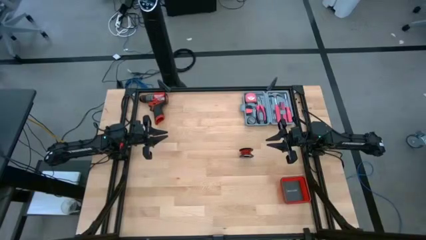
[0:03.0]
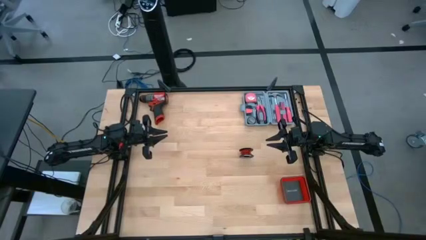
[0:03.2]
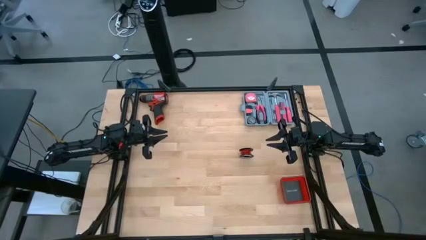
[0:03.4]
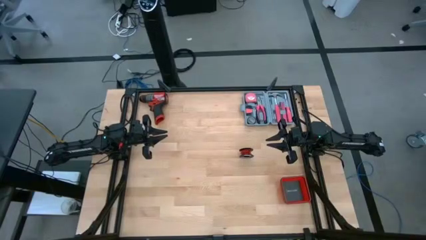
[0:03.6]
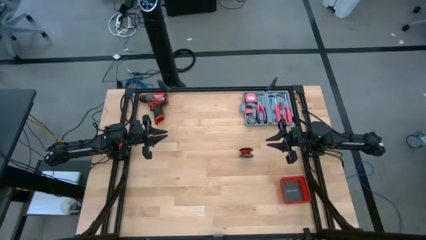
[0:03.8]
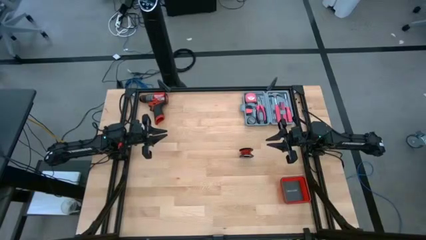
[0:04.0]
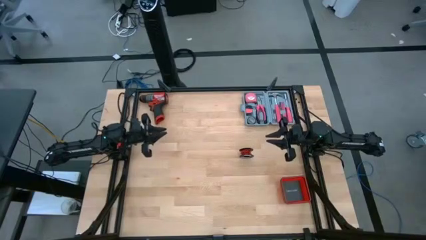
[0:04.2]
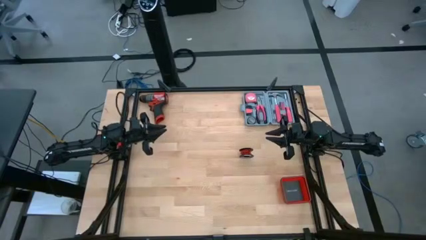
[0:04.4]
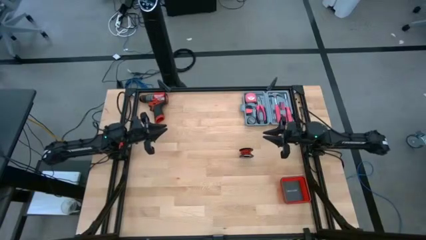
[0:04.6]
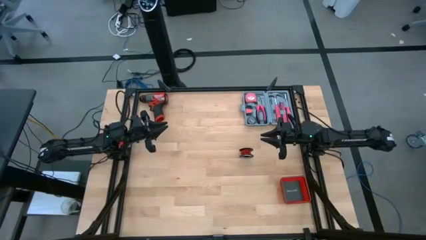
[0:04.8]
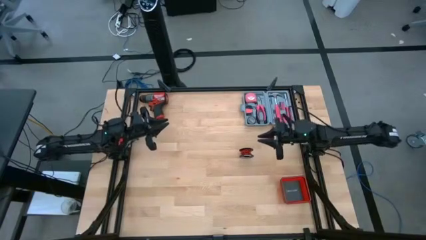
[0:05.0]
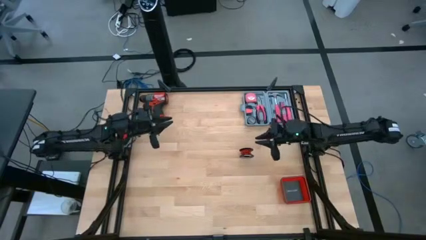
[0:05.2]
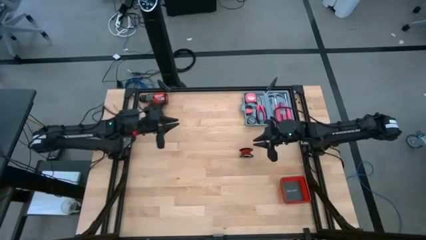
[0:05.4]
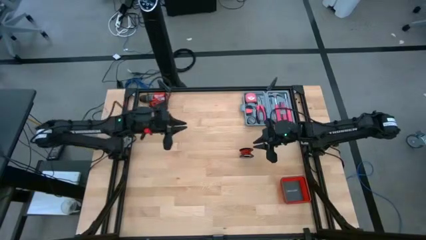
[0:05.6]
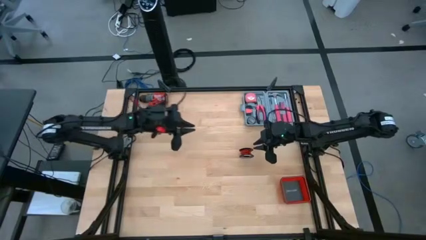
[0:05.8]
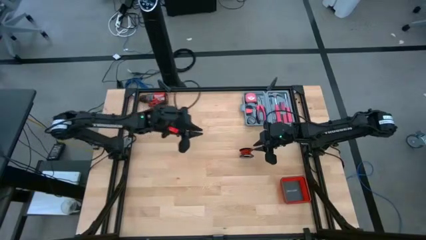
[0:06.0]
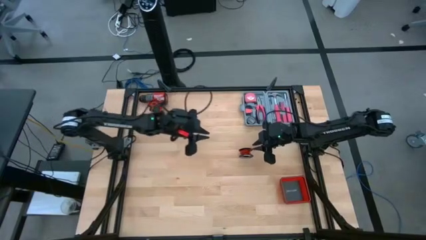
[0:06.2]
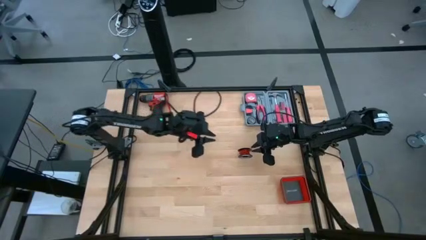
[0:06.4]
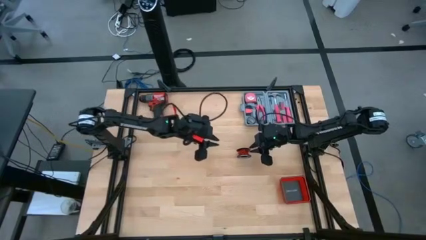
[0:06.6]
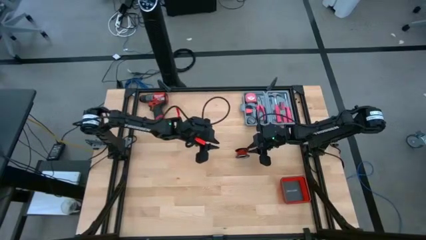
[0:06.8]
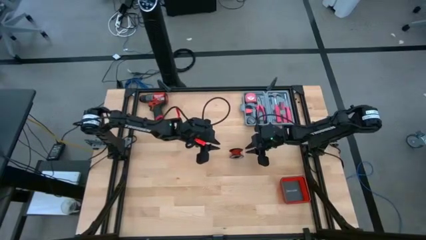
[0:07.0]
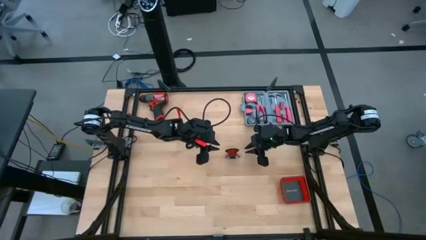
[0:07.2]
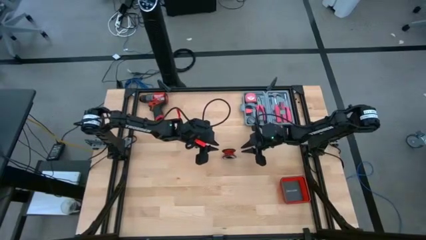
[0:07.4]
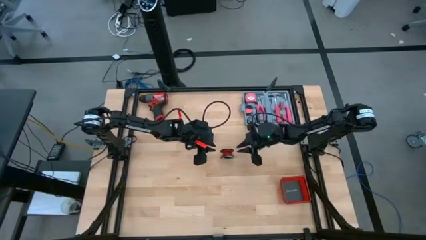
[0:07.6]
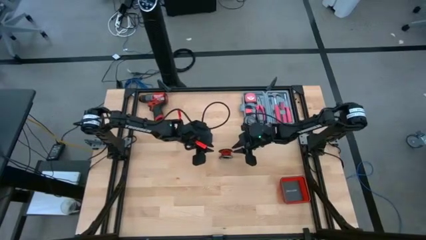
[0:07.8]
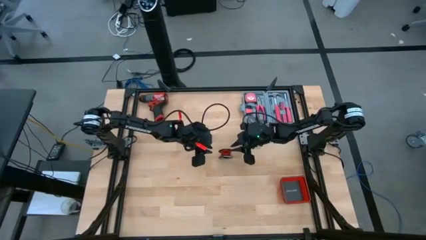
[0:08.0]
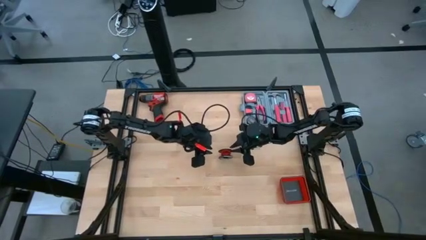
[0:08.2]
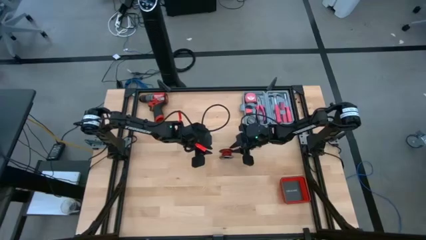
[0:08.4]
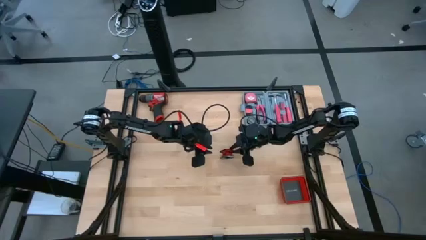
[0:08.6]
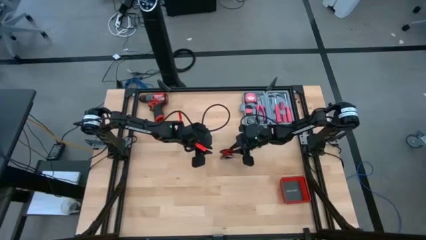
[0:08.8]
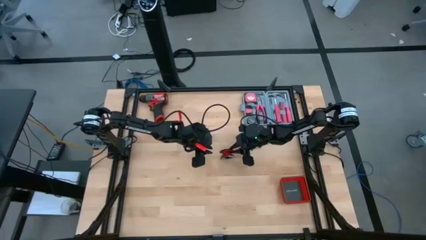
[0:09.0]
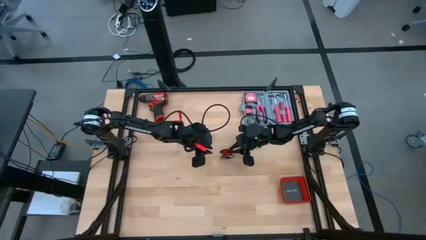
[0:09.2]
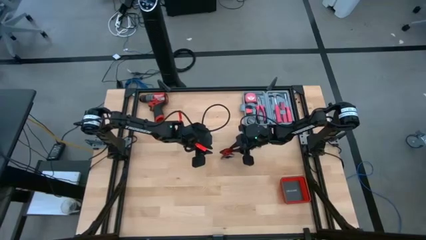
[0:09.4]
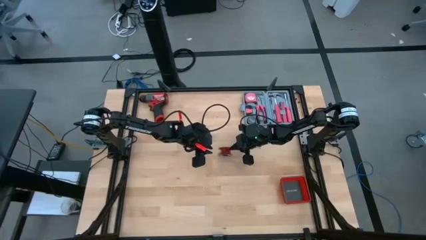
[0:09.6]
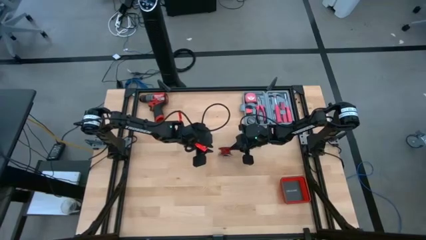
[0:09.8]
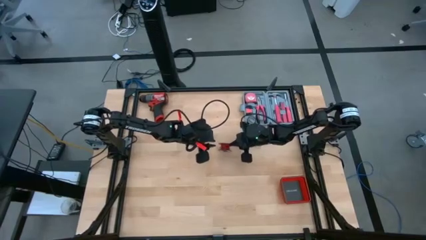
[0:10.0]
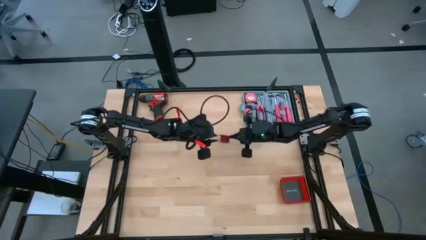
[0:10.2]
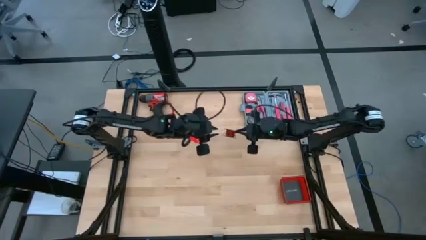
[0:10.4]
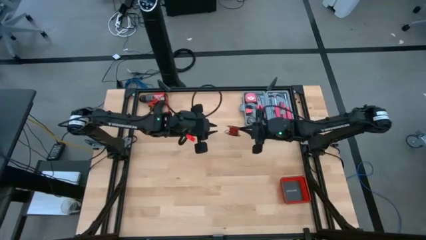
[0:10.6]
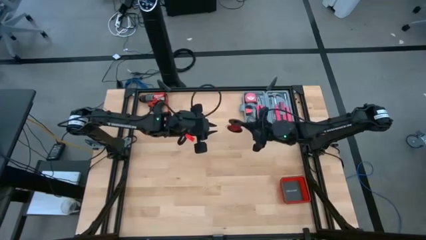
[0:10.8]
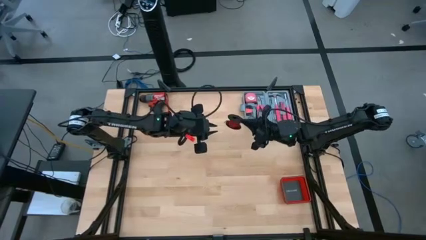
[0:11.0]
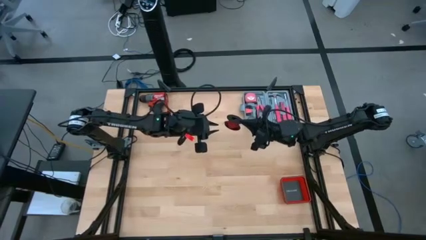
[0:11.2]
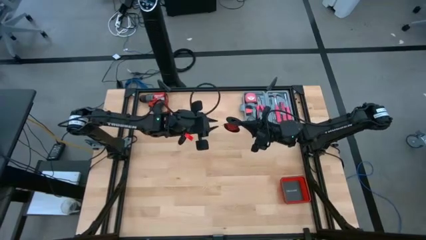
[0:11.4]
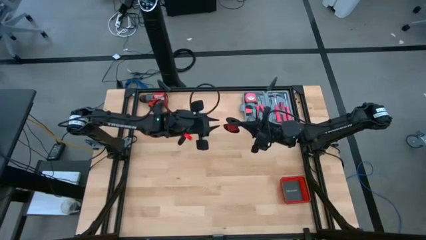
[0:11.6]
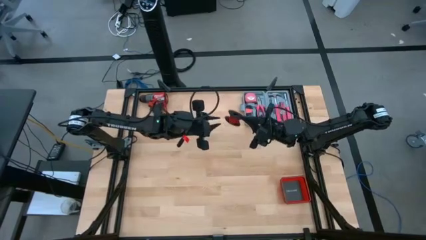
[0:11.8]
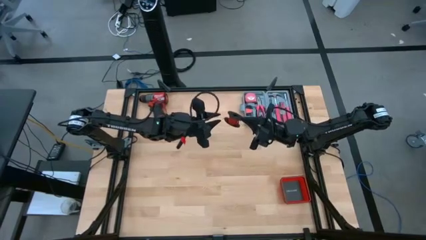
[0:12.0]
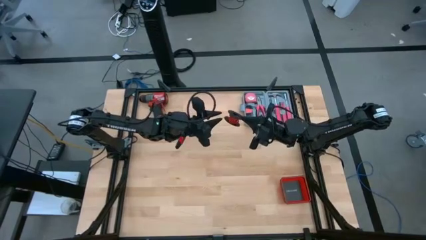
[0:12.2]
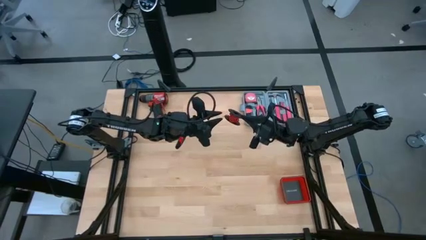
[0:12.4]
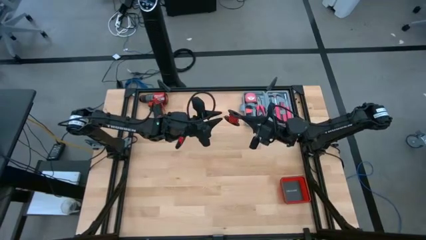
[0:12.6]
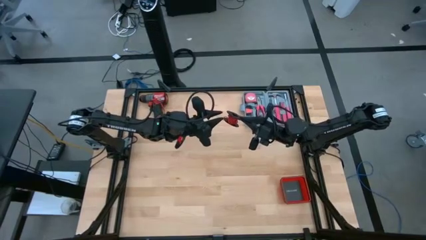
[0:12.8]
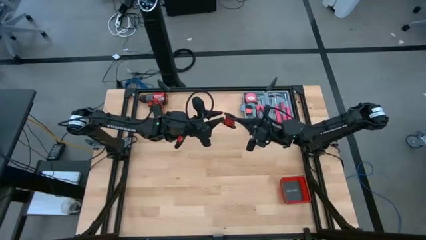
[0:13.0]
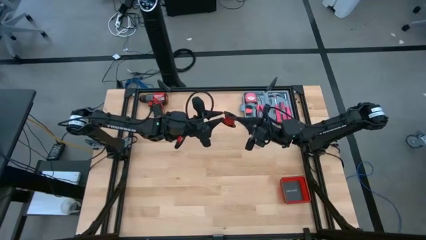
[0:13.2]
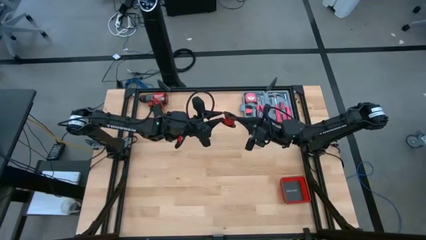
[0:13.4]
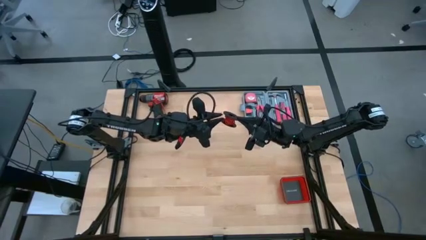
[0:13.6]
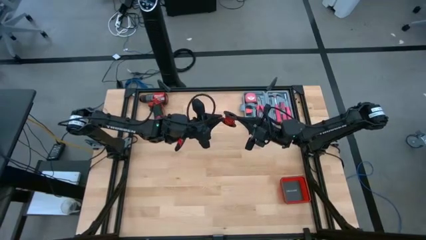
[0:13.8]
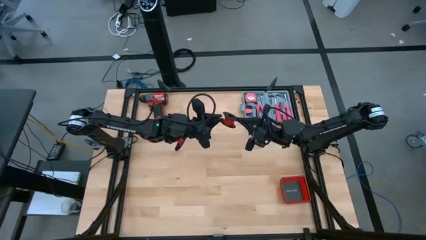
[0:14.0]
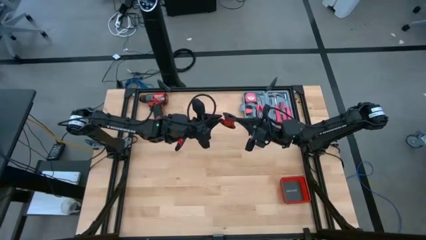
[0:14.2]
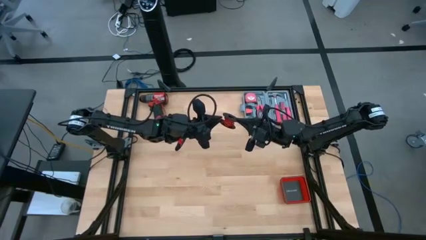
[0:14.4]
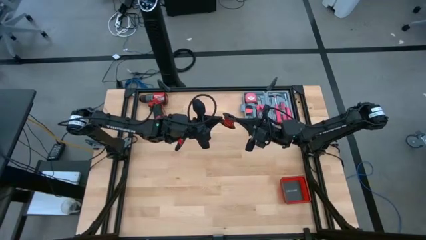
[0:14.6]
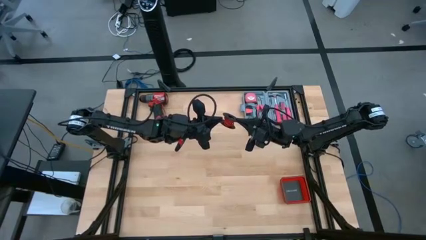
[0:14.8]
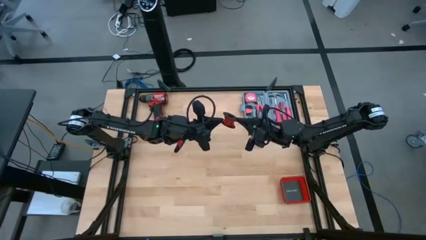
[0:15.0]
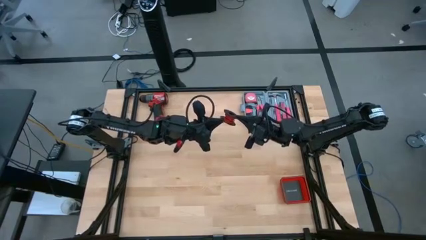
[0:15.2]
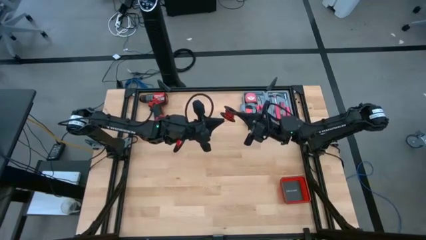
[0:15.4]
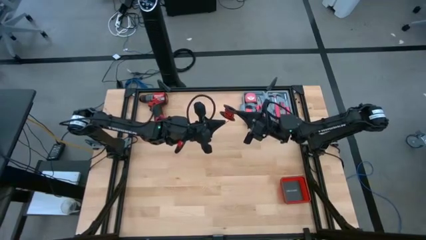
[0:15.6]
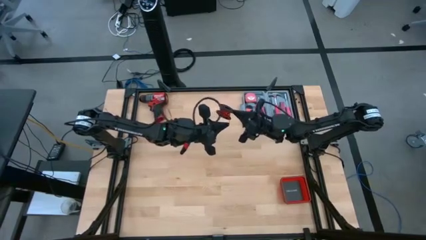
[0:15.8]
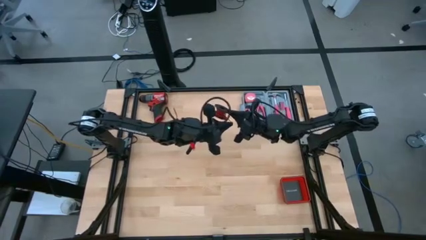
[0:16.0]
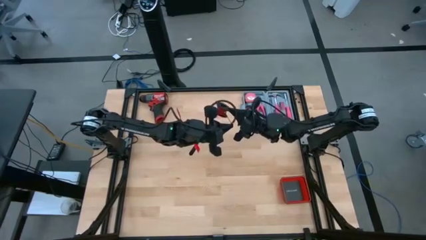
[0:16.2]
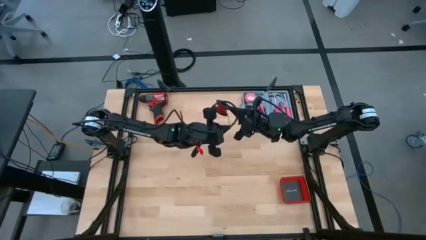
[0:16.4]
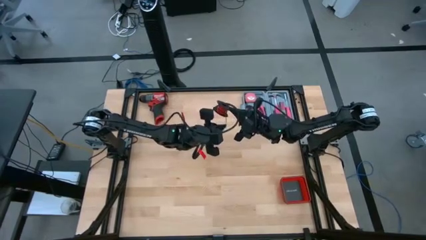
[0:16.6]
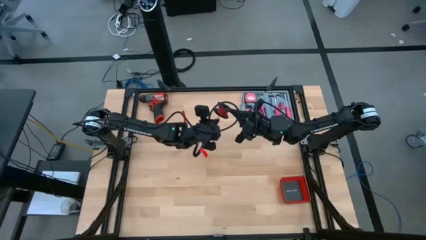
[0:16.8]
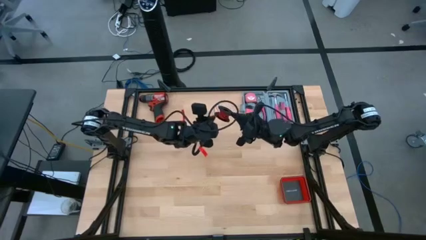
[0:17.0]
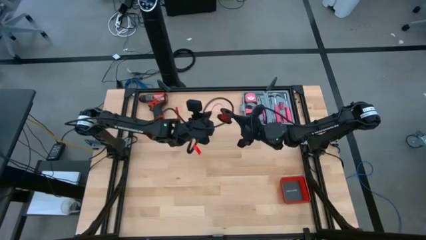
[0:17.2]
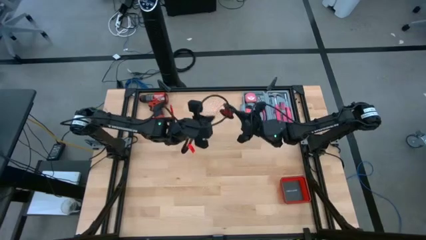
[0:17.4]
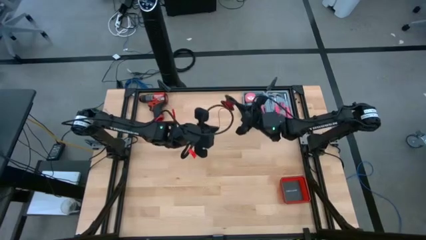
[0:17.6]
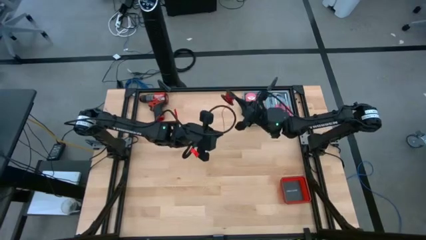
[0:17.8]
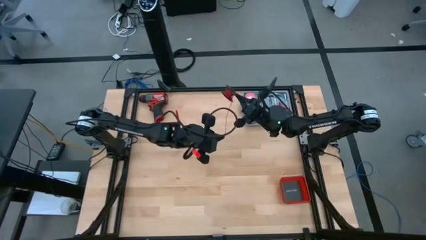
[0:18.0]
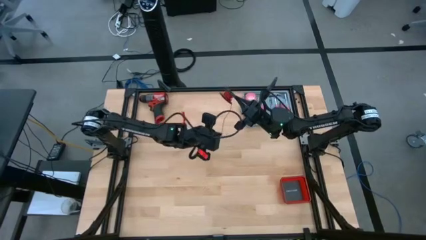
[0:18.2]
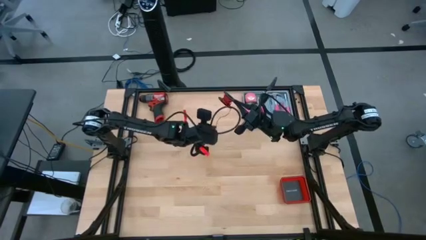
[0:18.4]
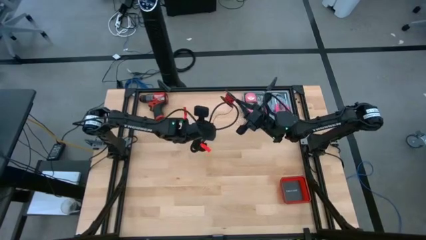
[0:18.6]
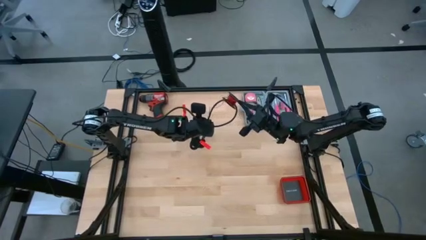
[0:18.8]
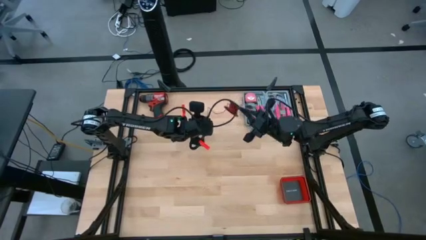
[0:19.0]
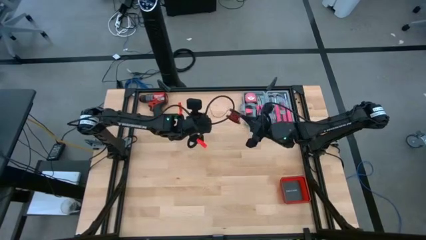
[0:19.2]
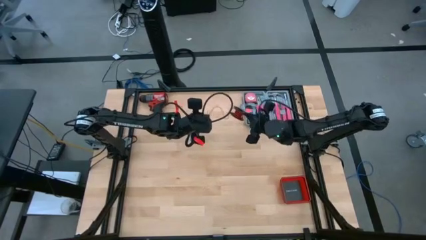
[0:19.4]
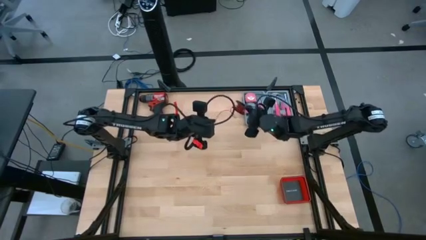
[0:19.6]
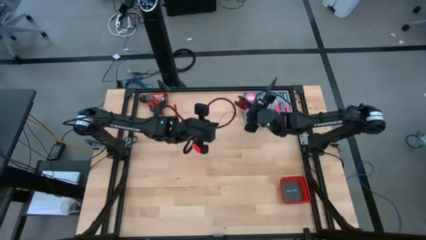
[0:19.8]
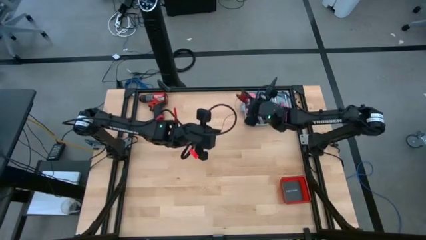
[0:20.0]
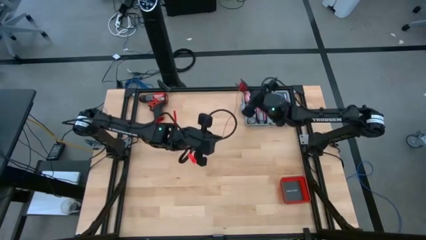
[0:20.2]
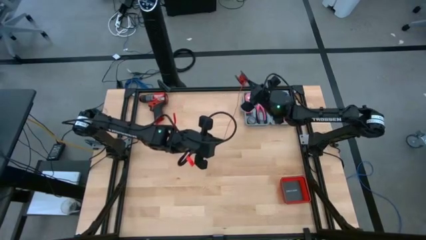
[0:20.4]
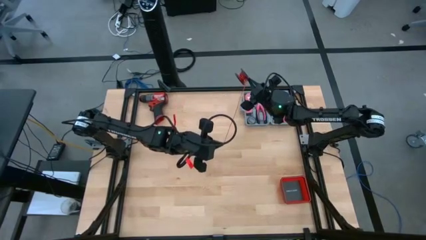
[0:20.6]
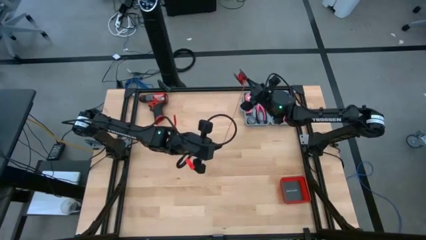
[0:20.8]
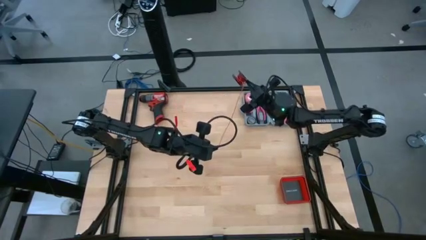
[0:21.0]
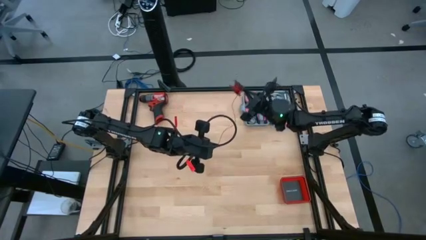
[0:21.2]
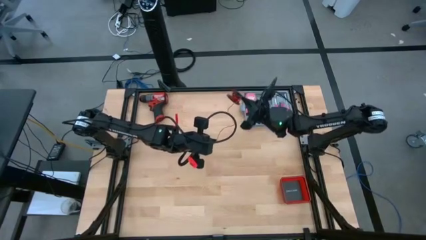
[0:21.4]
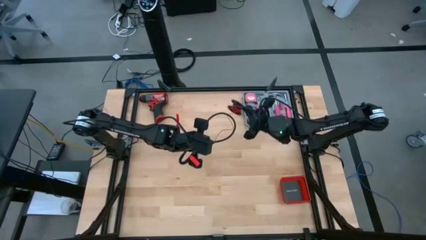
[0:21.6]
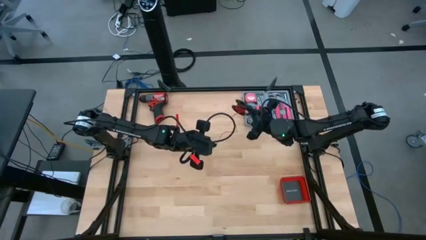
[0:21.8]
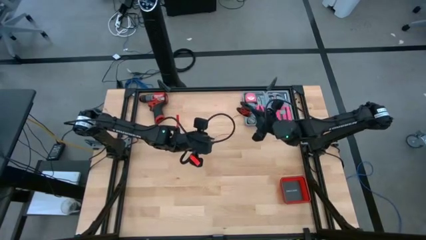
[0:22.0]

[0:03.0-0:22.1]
Task: Coil cords
Uncoil the red wire from the black spool
